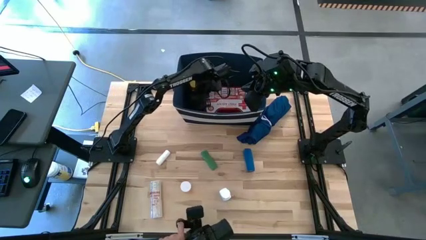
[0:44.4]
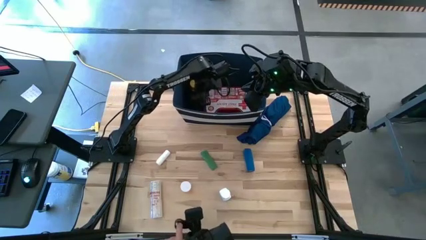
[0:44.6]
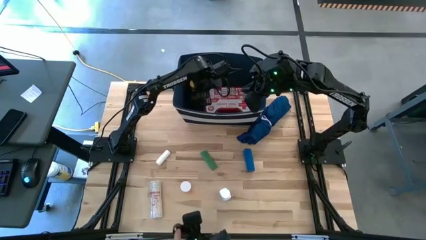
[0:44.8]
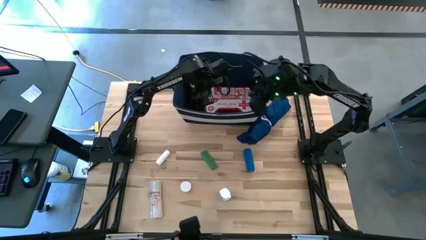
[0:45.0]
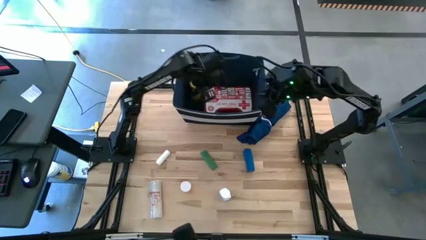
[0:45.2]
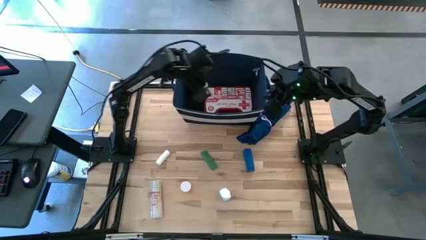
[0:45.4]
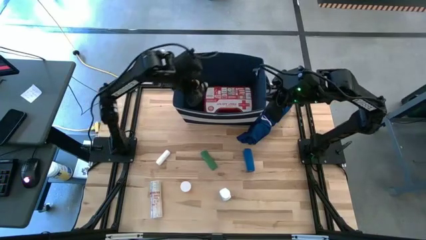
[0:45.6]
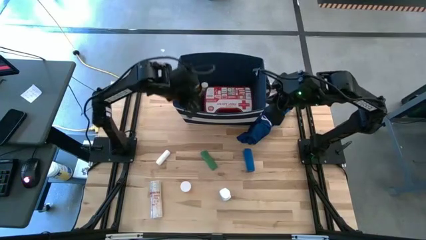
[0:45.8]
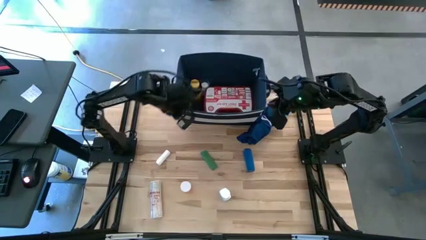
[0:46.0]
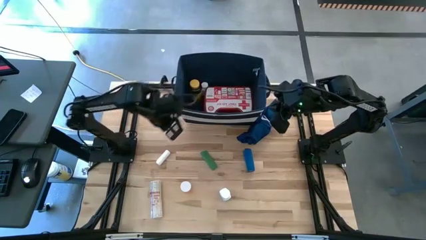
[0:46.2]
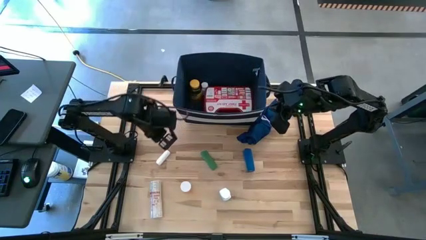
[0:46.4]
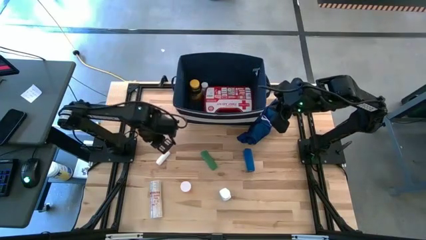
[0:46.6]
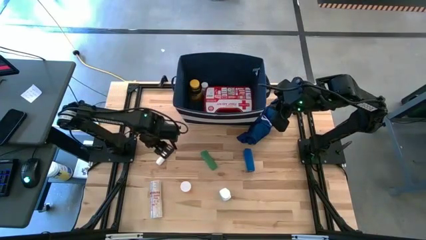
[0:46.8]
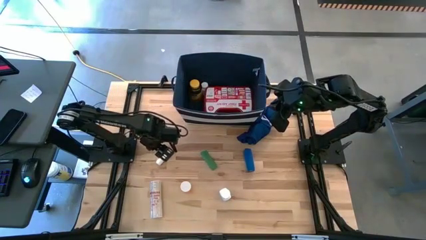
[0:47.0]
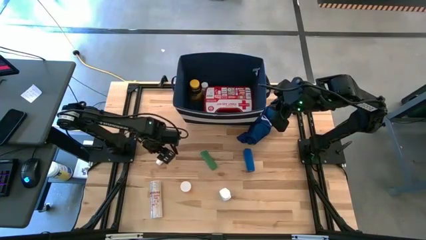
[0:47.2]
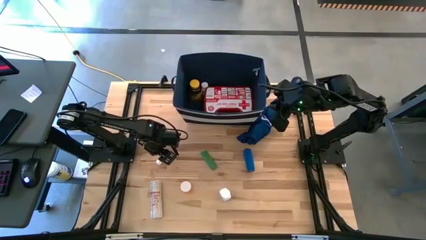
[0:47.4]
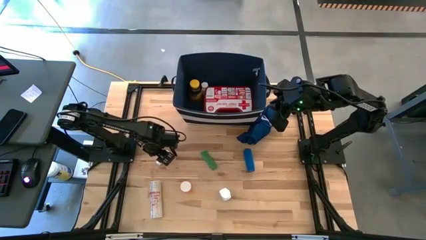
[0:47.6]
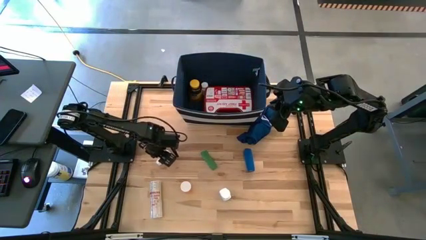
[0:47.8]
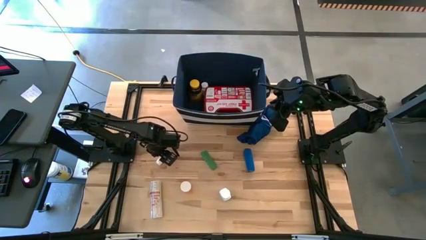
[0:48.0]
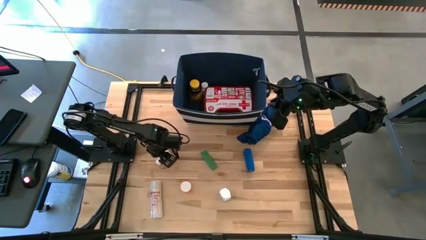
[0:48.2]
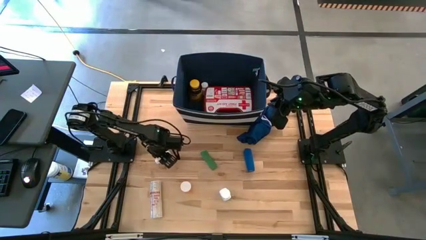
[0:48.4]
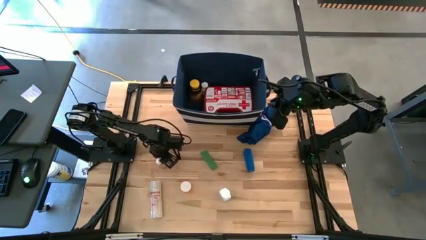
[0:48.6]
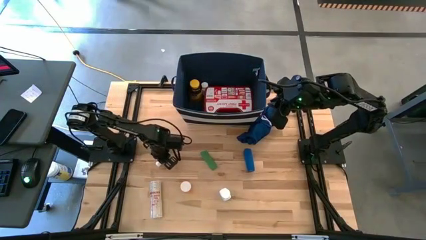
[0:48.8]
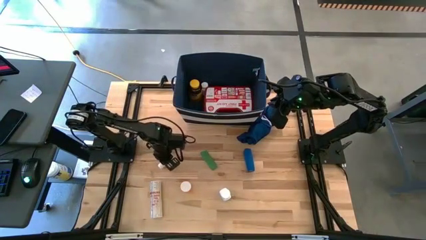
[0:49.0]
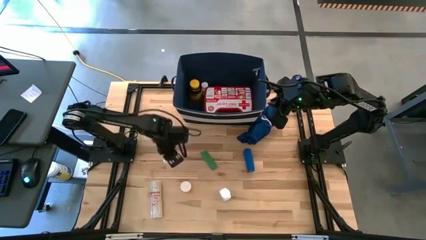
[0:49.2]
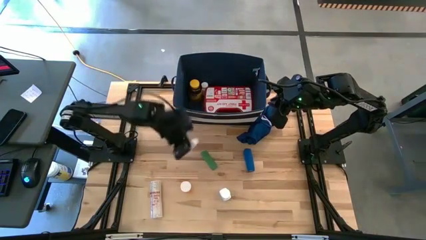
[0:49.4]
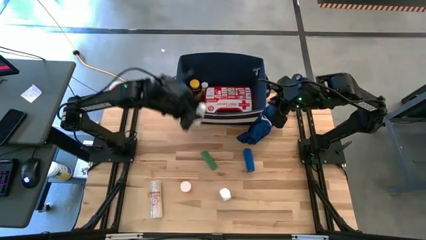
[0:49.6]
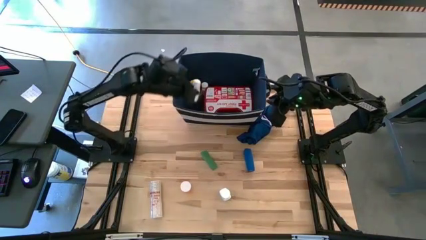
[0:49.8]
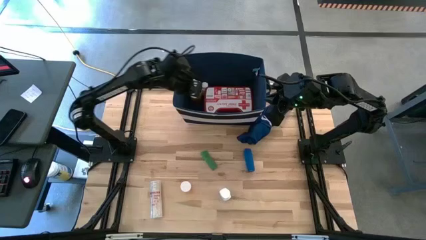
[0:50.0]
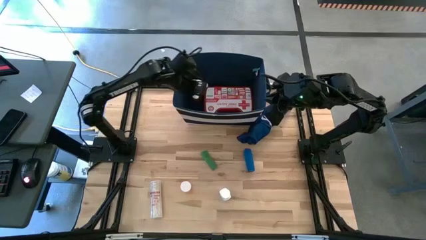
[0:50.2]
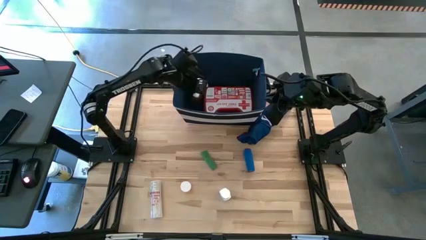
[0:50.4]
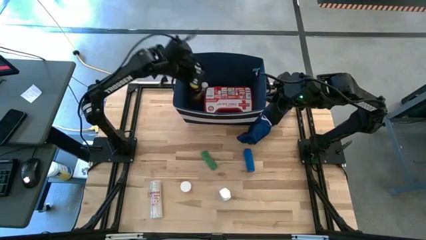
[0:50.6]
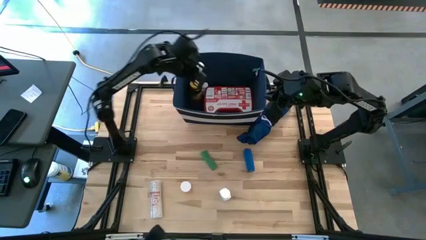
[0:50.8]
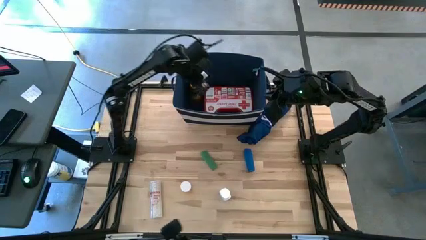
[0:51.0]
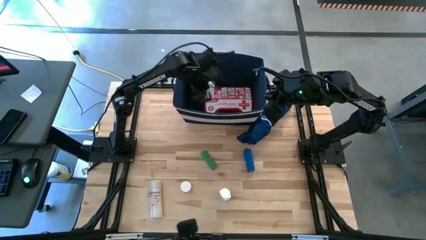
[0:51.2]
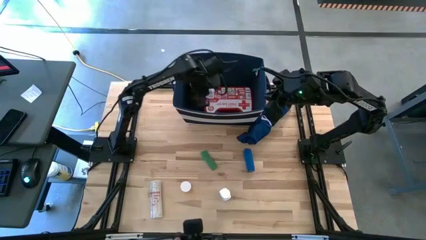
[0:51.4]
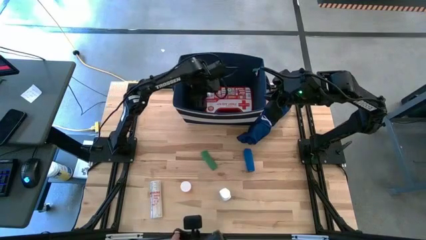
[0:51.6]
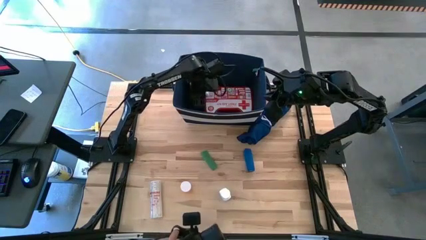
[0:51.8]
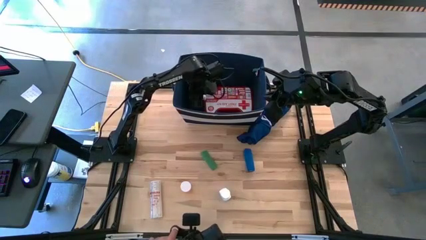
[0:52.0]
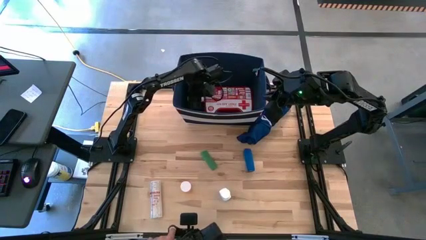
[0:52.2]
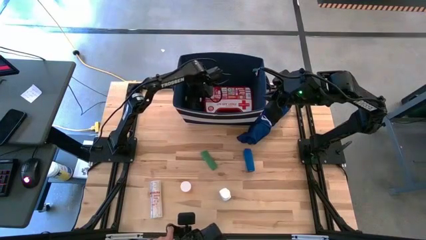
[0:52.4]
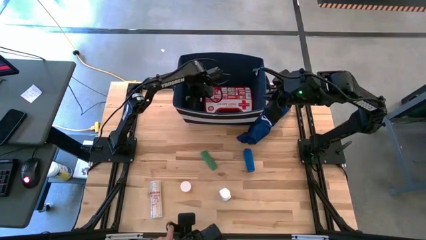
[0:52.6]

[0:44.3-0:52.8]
Task: Pick & place medical supplies in basket/bin
Put the white rolled gauze into the blue bin

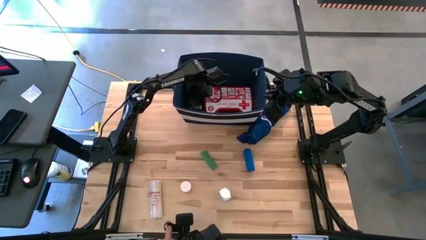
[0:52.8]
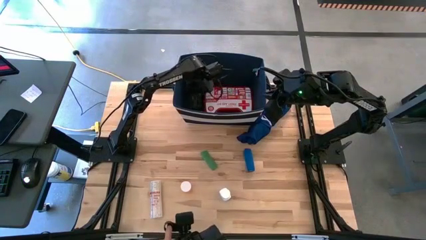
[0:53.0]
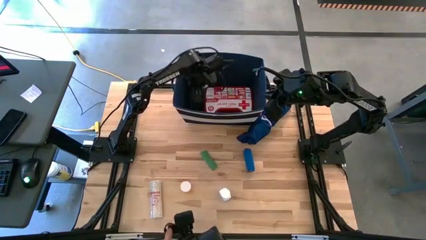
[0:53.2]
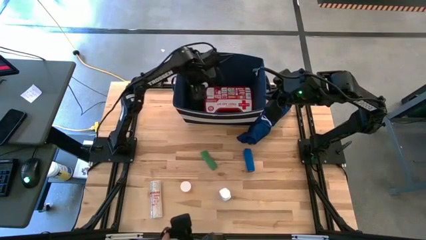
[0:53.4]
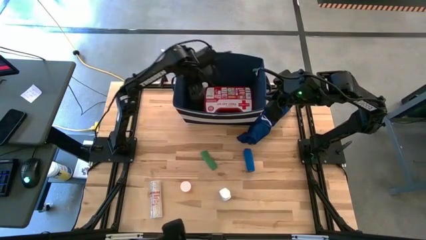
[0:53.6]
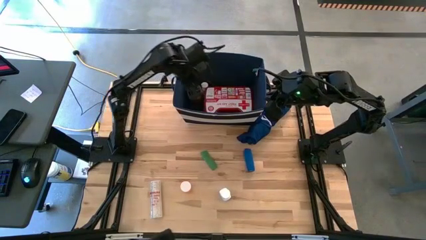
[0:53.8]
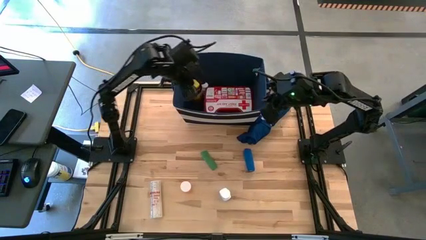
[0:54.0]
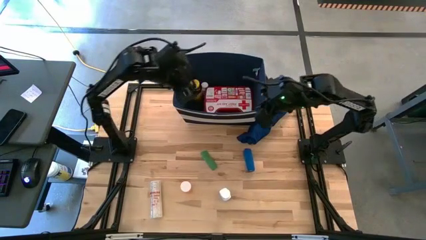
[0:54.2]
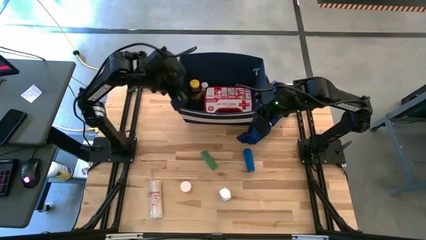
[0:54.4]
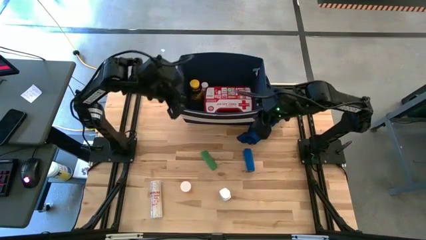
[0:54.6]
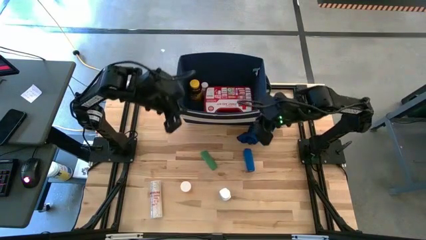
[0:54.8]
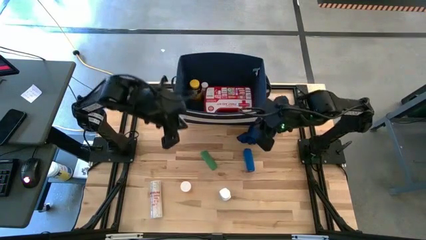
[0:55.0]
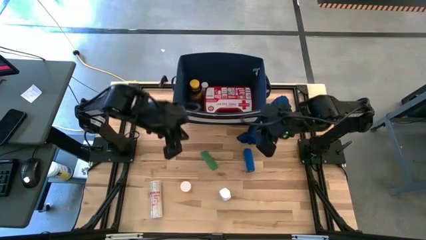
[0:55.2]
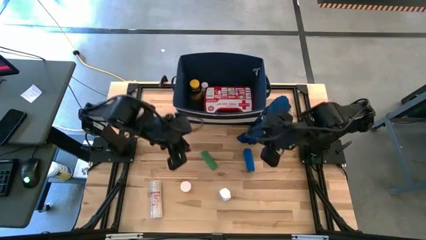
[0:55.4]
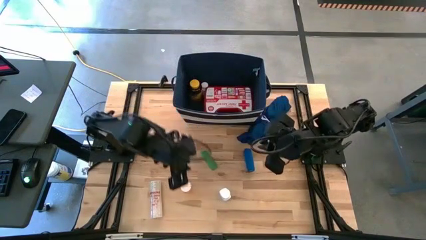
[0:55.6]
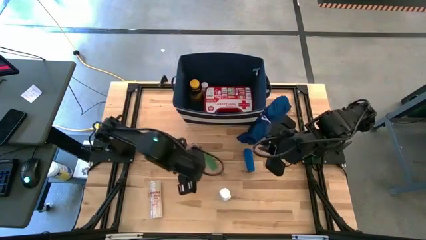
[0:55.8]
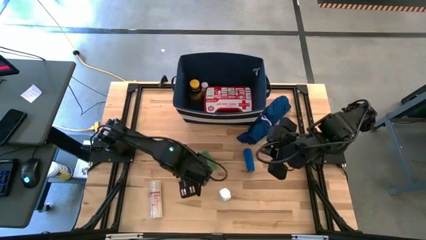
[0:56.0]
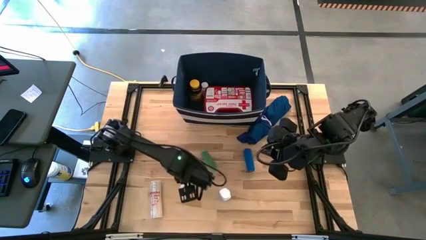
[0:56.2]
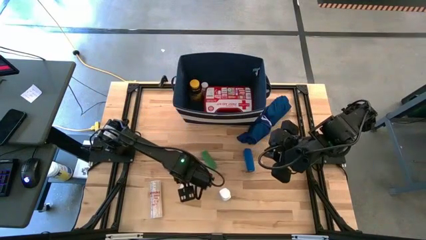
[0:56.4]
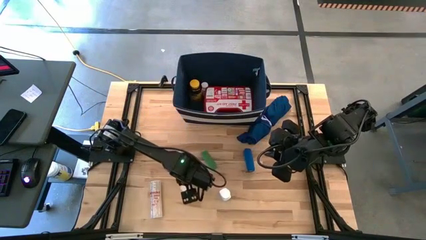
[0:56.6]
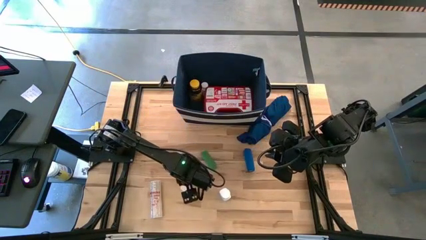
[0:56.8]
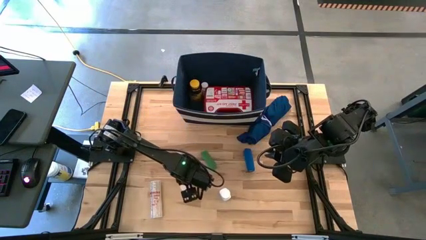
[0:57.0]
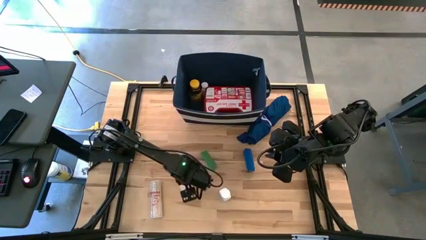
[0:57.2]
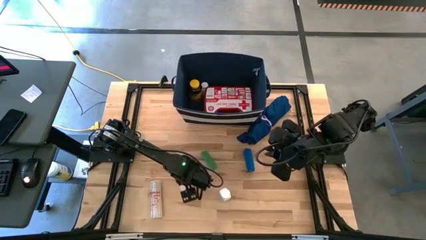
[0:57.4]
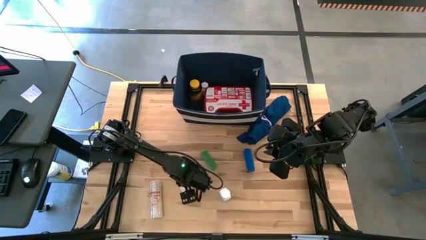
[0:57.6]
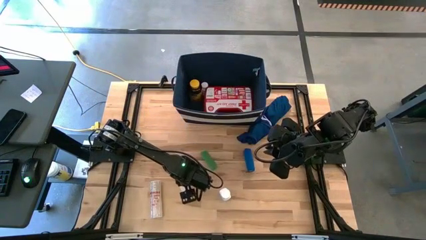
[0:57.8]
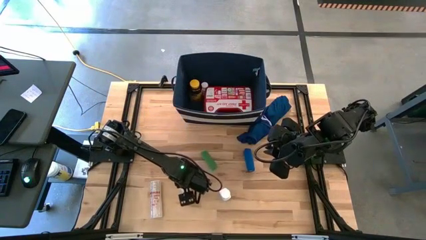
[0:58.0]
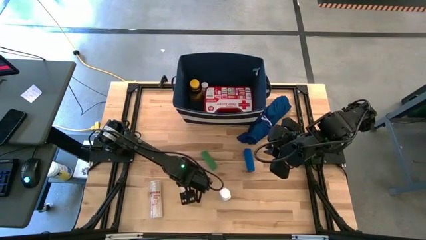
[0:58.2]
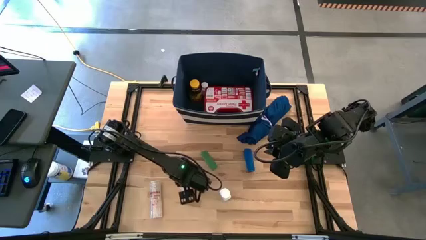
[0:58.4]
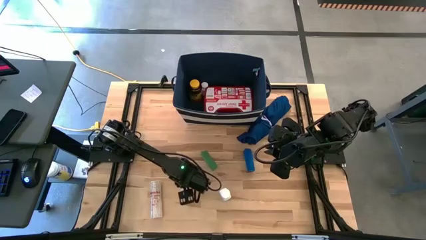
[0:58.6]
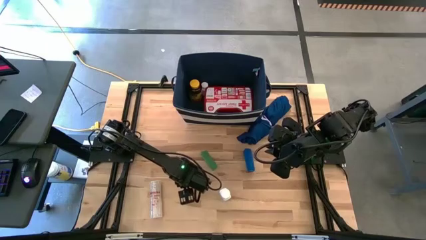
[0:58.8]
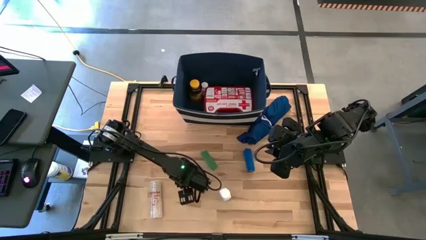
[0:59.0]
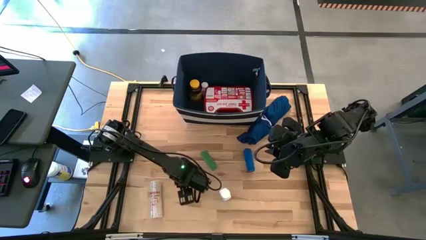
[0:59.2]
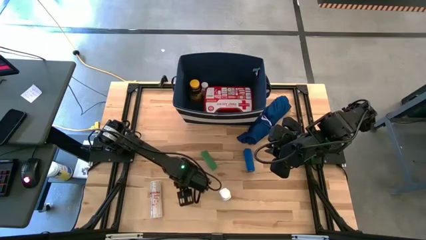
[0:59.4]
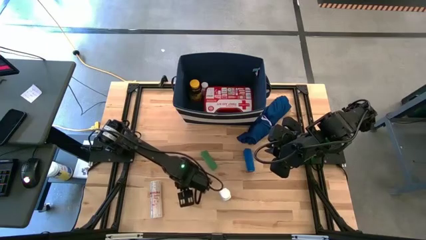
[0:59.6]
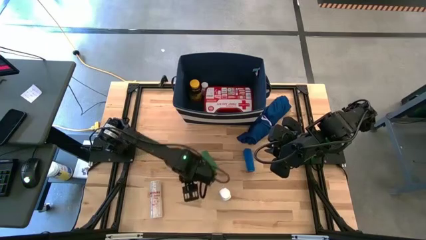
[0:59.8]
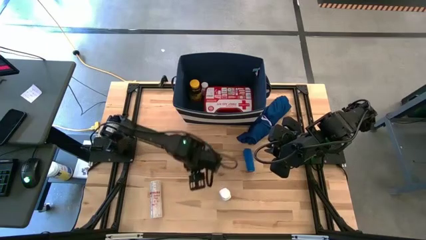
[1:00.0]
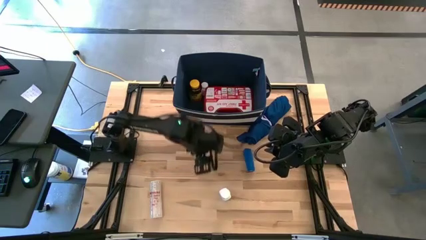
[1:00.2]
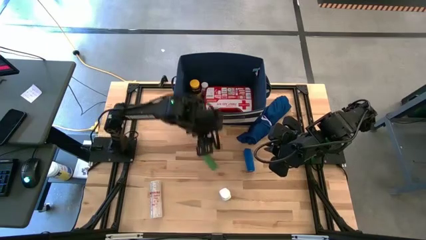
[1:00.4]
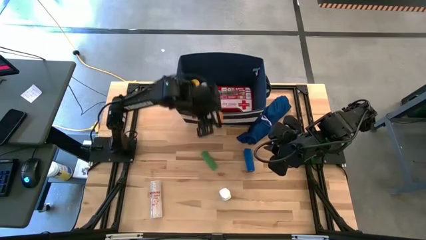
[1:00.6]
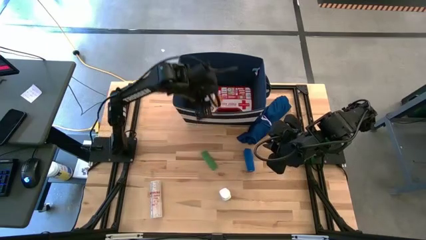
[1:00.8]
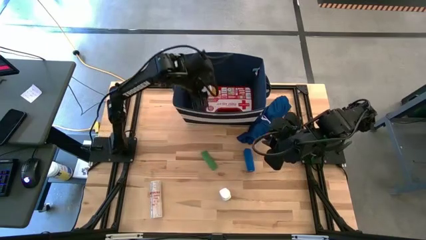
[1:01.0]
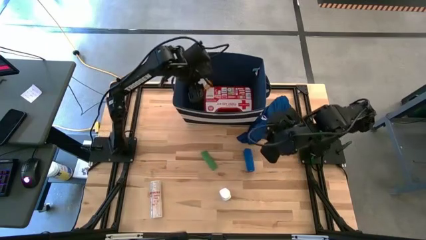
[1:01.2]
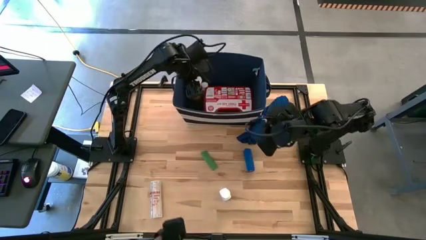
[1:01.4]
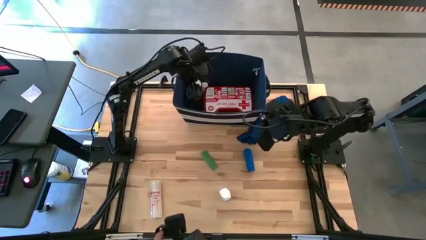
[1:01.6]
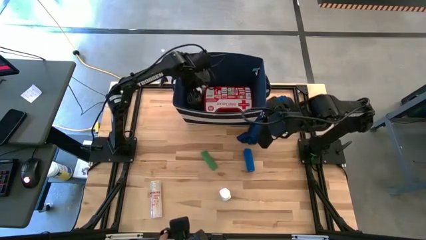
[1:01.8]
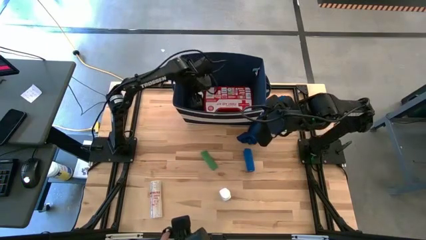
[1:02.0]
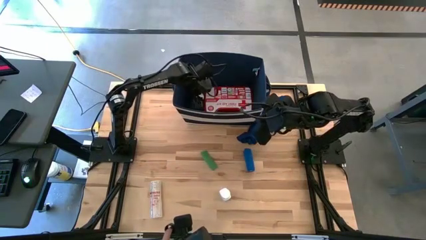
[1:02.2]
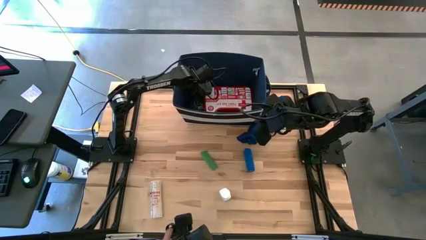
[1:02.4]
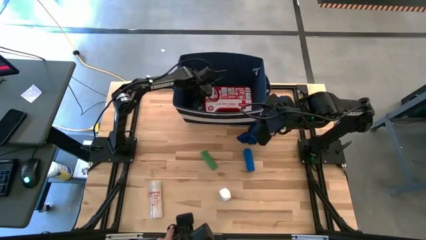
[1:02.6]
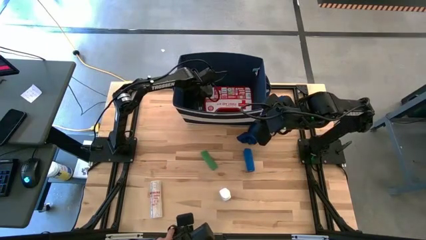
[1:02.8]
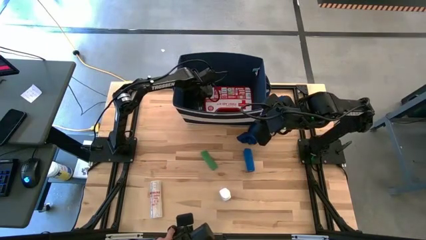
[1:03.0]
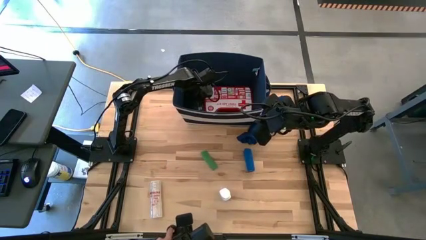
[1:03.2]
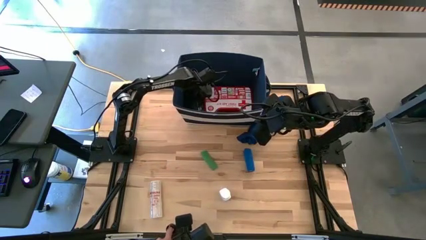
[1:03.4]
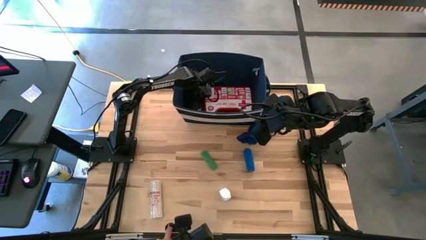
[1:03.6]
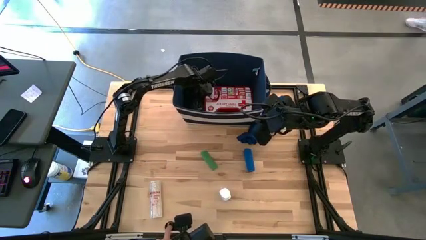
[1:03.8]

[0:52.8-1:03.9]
Put the orange pill bottle into the blue bin
